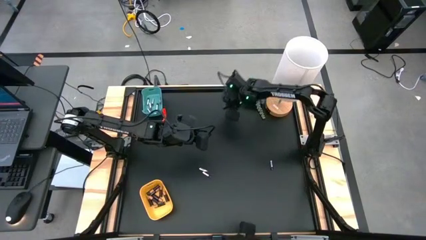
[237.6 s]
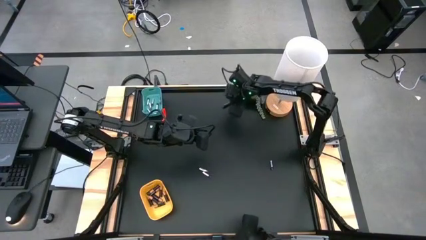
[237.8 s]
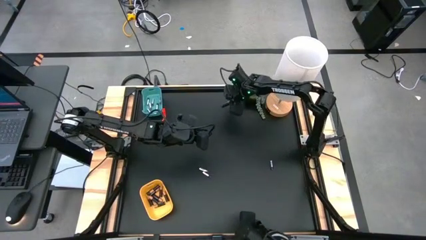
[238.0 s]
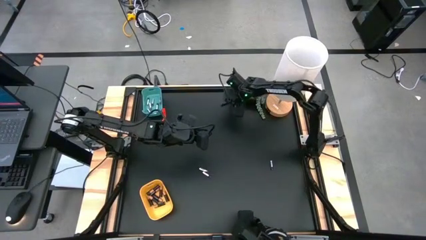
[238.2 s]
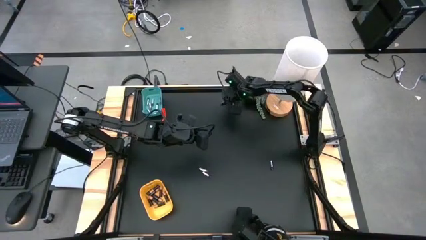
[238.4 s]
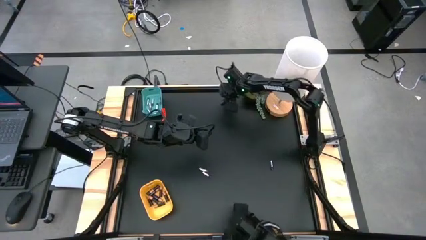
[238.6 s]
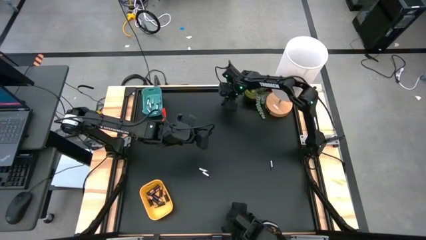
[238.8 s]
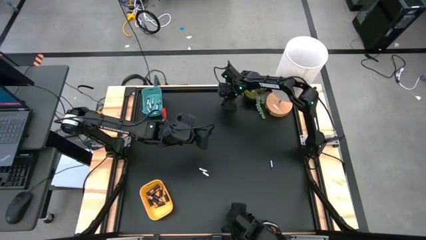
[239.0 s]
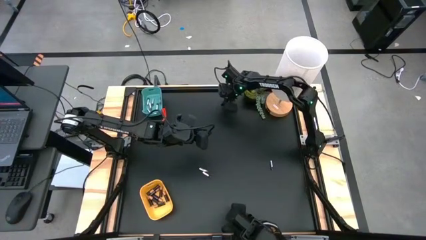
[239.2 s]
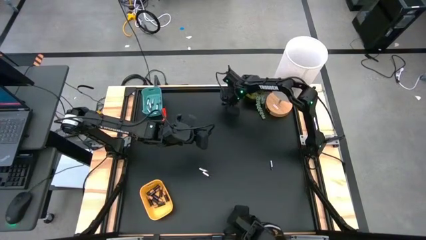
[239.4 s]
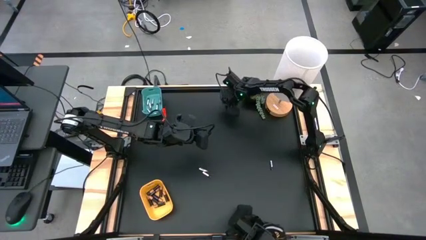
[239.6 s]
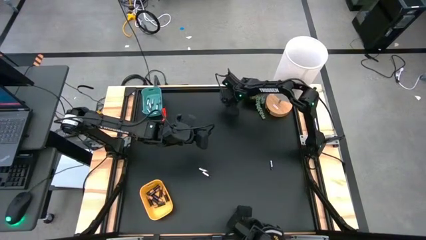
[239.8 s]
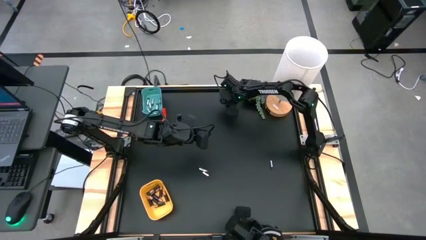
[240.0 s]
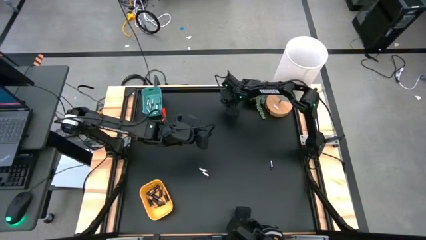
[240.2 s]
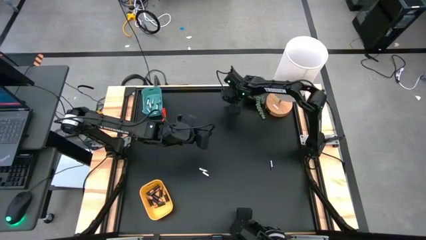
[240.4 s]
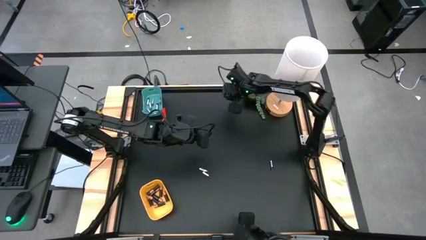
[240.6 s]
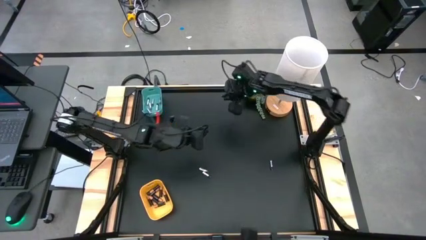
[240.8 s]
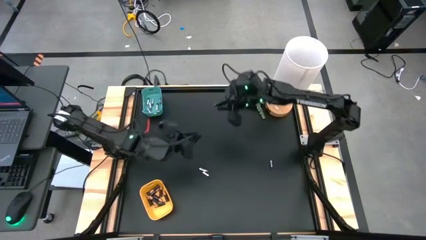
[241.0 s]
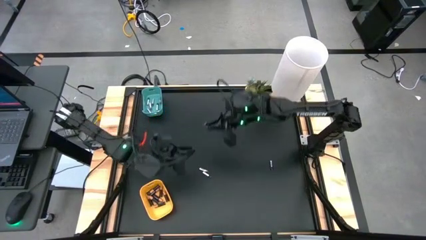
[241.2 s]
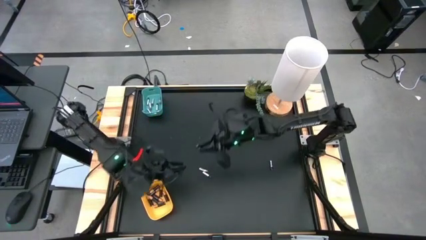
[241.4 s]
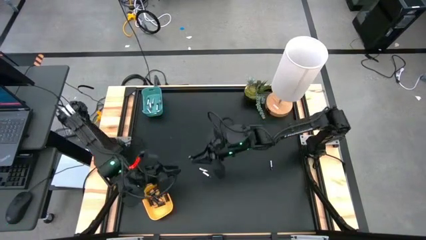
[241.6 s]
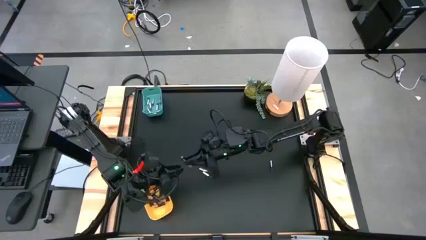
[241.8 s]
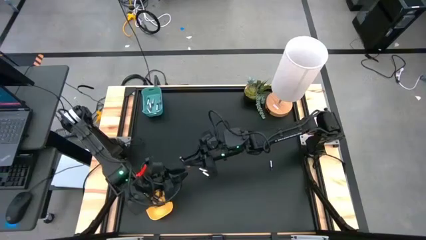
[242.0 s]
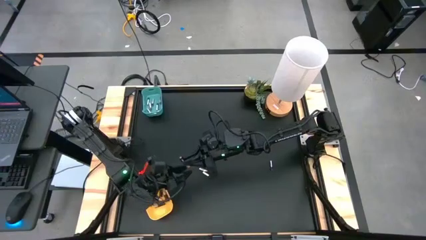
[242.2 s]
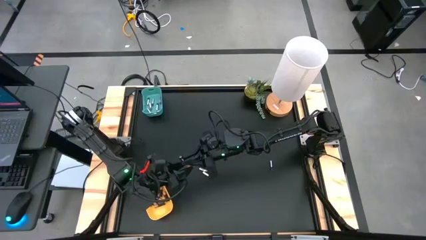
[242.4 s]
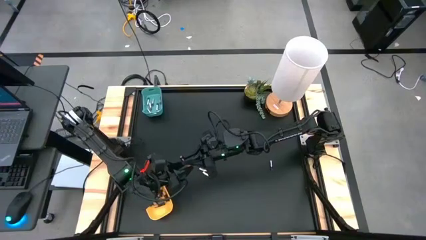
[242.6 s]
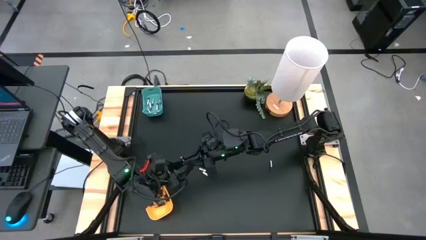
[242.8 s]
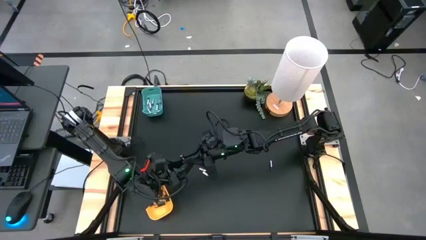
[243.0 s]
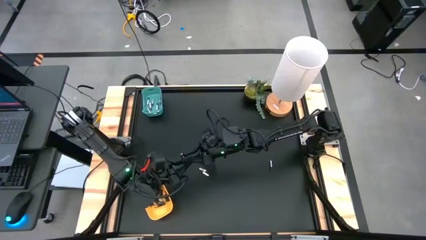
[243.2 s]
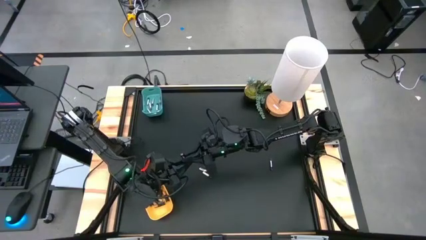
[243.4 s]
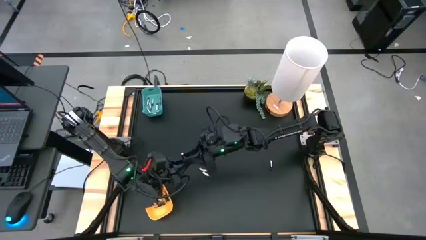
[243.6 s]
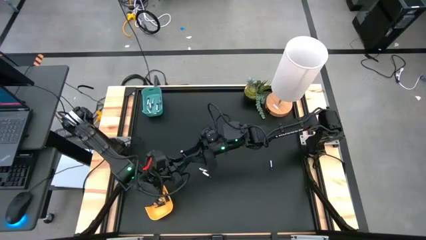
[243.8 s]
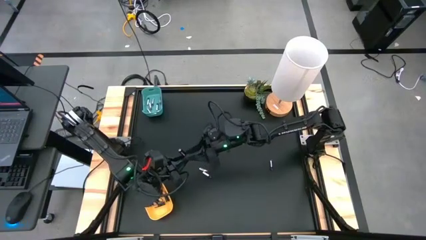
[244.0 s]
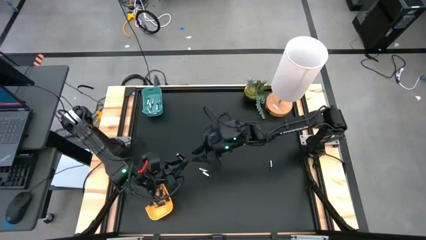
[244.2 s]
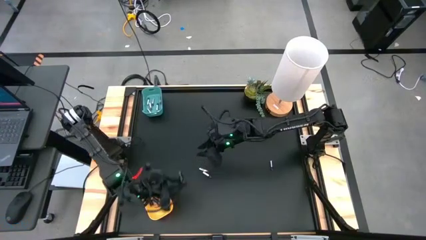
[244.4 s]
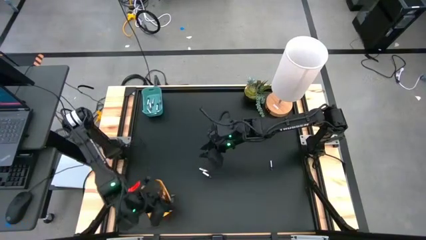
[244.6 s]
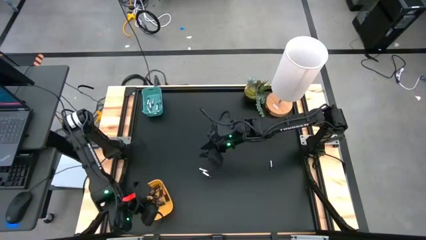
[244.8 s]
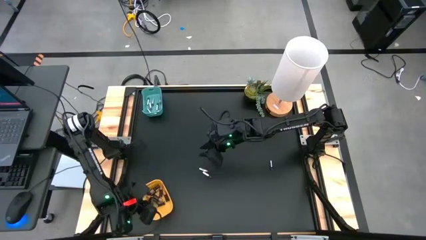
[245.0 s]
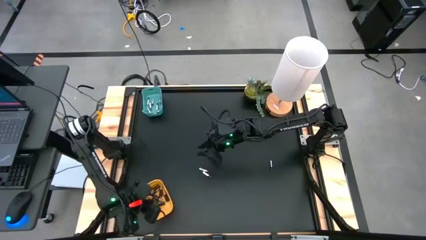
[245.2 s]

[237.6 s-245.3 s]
Task: Sort batteries
Put the black battery into the yellow bin

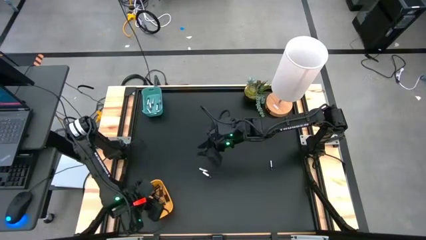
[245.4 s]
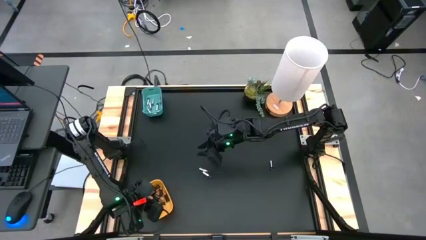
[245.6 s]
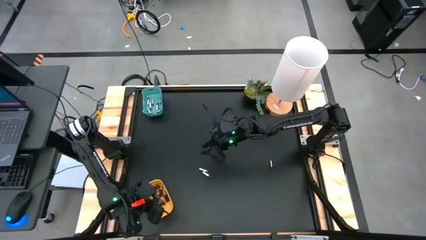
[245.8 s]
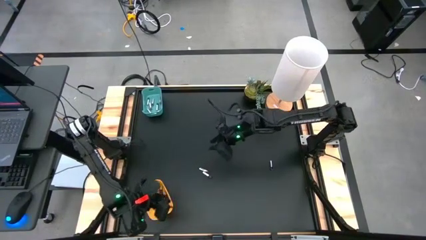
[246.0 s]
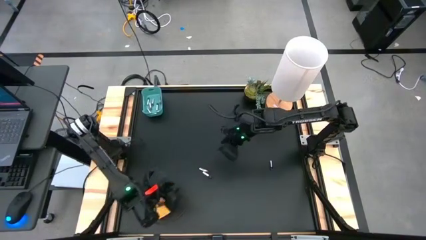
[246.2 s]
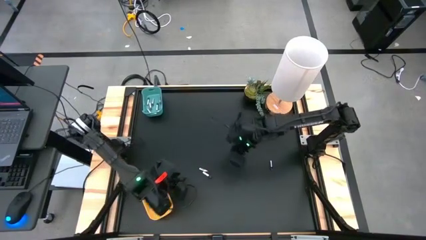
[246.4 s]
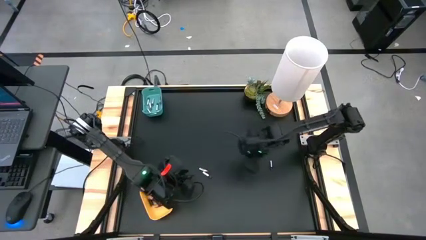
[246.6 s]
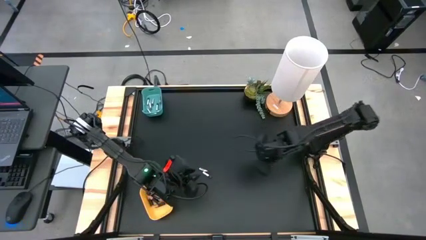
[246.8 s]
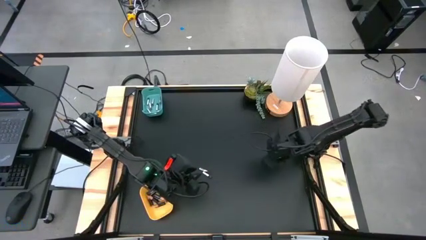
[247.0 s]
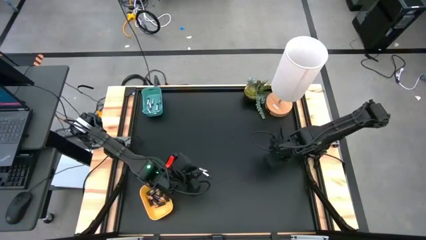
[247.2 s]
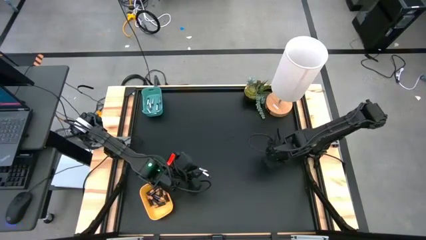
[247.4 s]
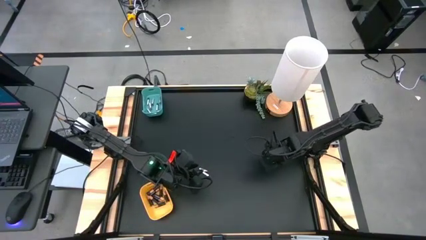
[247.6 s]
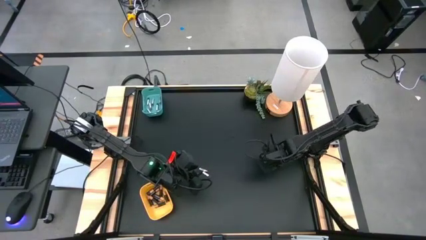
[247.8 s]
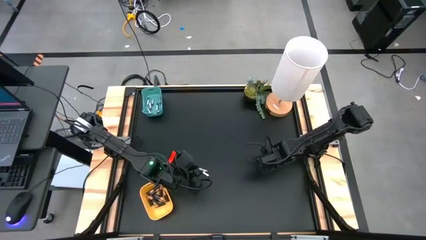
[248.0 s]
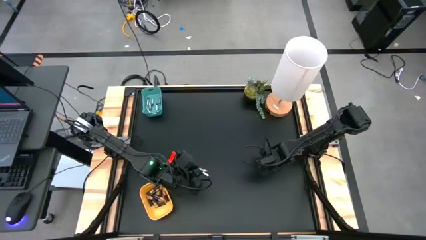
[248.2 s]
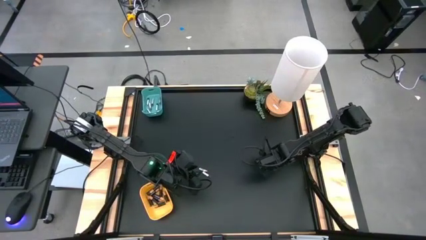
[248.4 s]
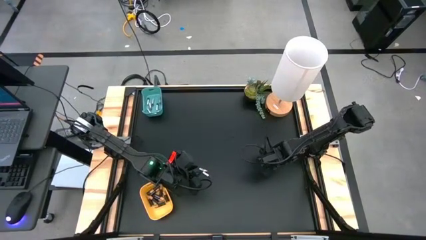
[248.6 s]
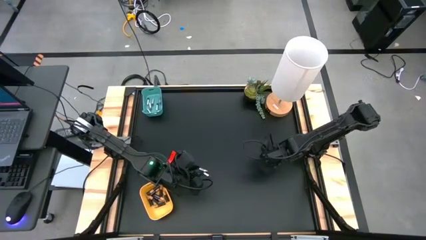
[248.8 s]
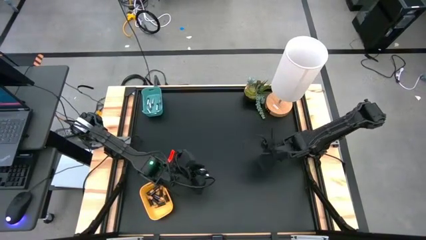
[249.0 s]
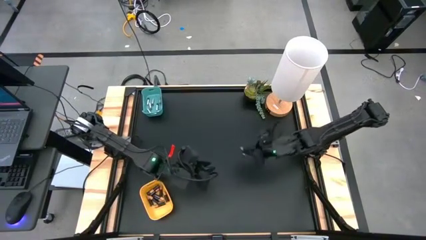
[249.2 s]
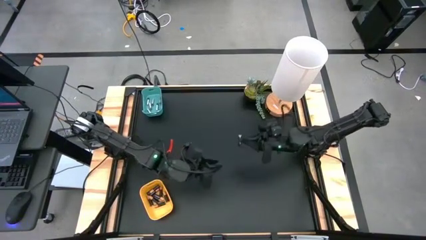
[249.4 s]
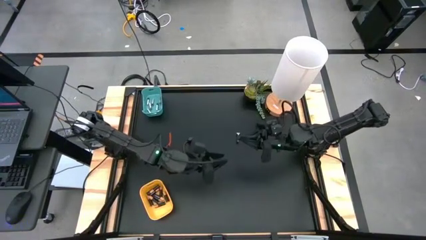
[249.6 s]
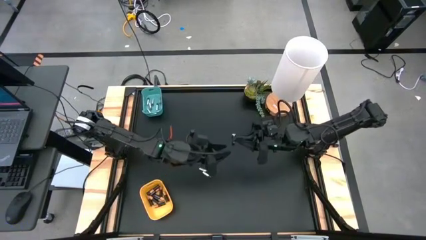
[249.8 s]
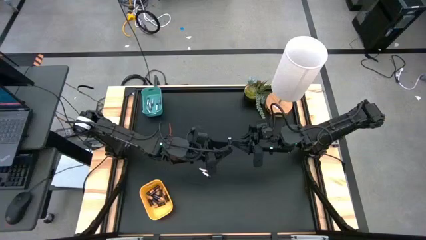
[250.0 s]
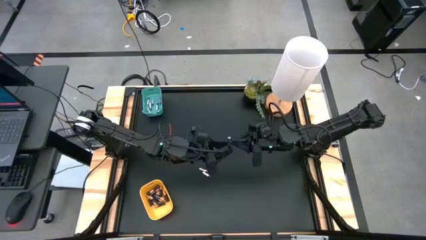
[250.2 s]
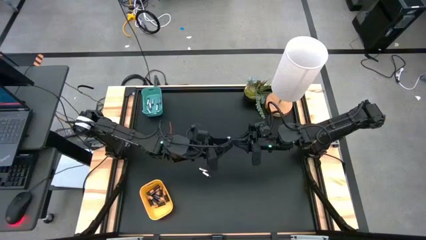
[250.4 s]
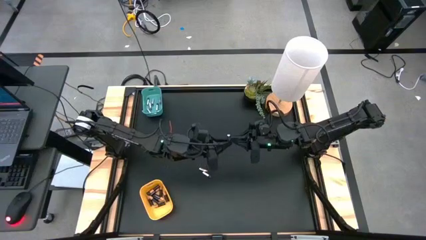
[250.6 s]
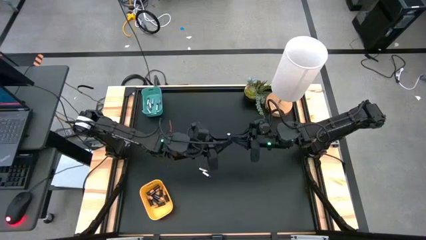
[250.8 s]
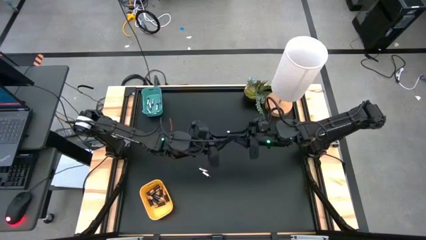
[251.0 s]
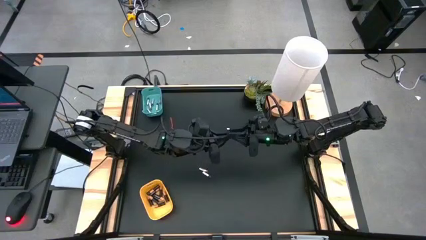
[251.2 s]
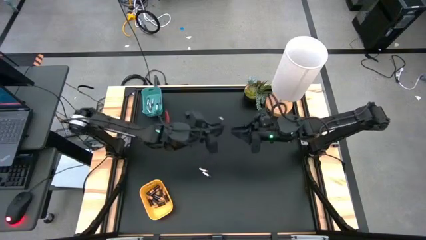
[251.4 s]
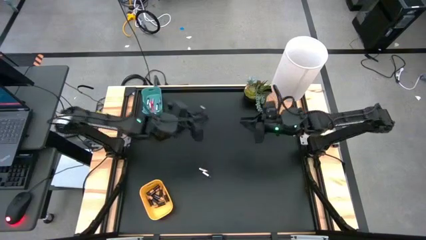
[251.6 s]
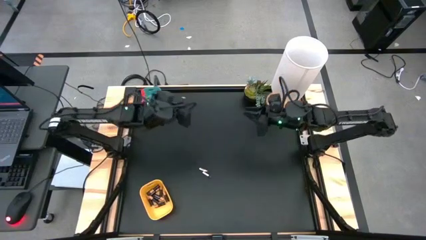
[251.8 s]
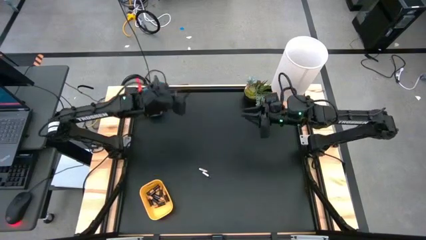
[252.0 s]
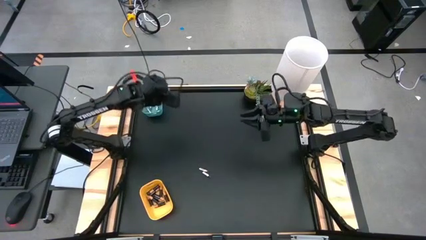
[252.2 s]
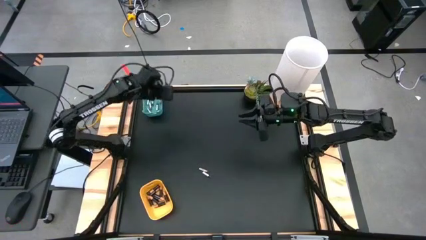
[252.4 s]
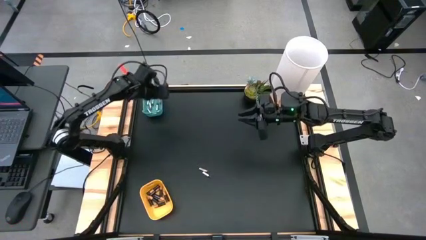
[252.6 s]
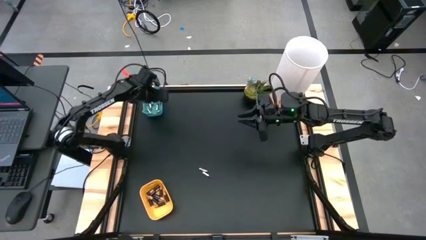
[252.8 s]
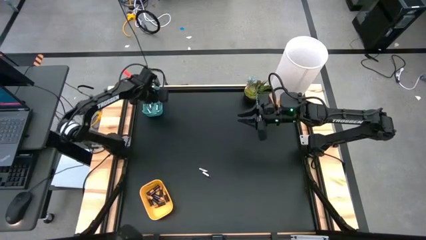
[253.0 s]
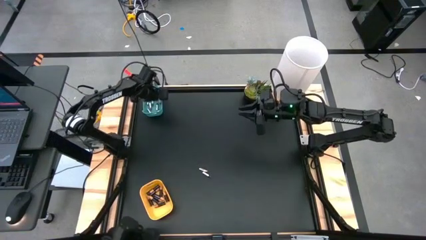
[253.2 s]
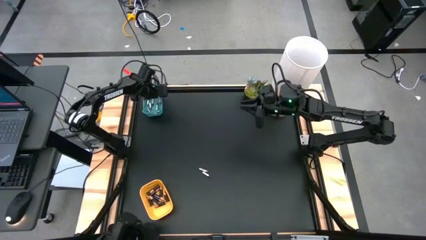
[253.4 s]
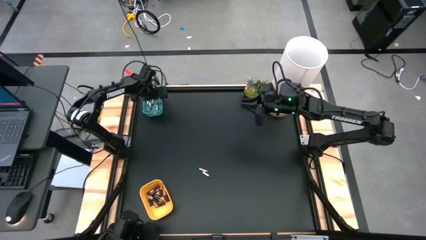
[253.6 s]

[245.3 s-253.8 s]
Put the silver battery into the blue bin

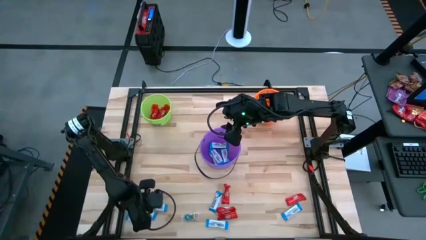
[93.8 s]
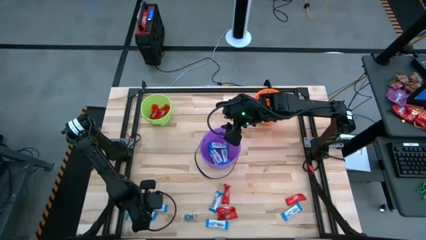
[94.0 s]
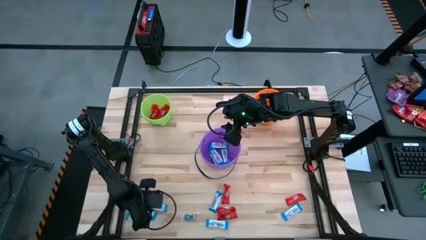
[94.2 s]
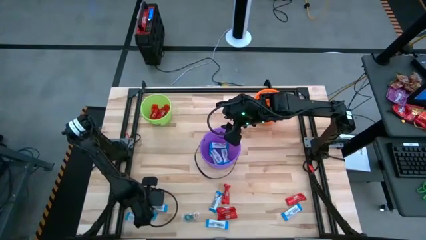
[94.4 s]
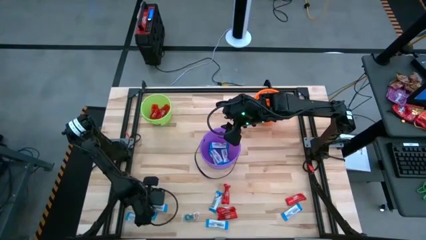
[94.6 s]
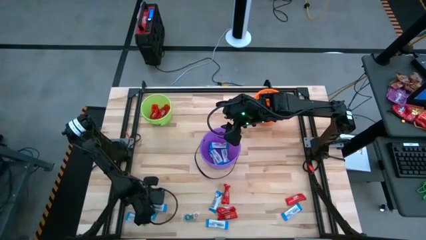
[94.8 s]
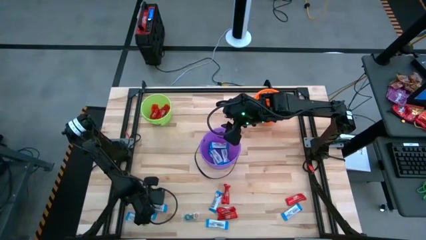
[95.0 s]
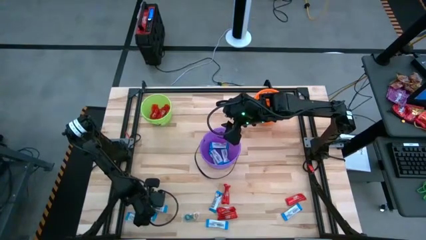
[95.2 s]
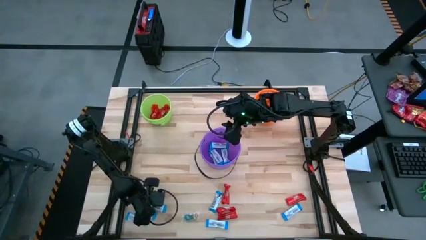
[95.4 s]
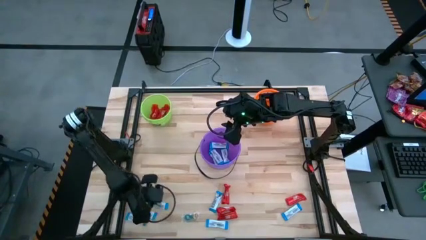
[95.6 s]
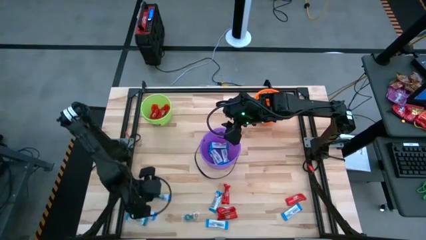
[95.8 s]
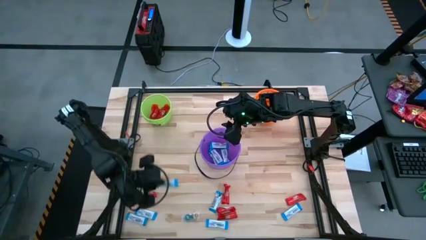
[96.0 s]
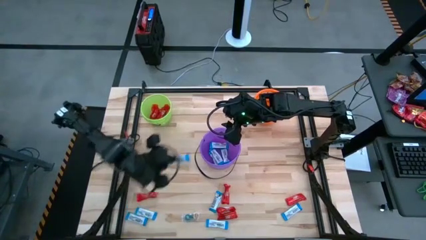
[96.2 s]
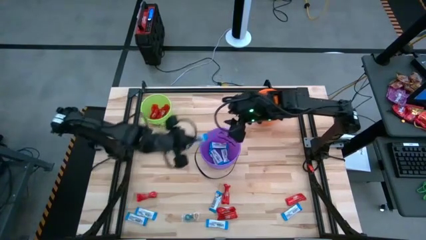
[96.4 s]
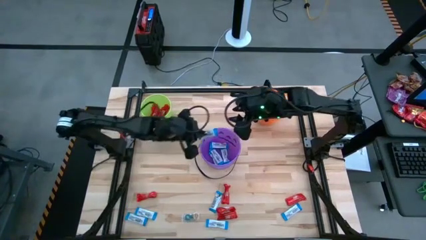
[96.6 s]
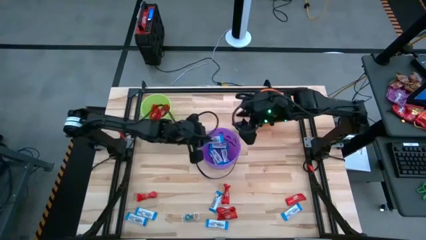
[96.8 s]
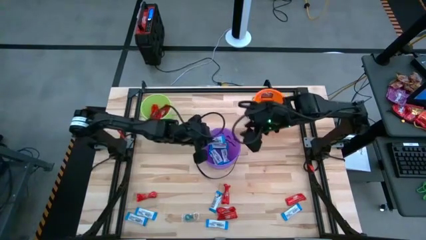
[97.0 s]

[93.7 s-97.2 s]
Task: Sort candy by brand, put in halloween buckets
Put the white chocolate into the purple bucket
